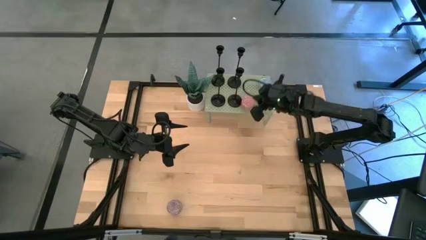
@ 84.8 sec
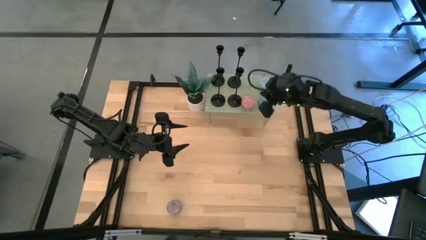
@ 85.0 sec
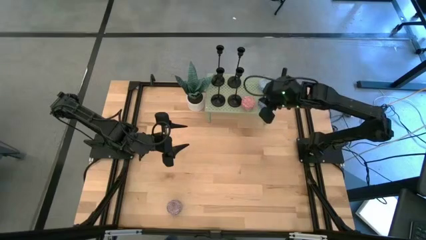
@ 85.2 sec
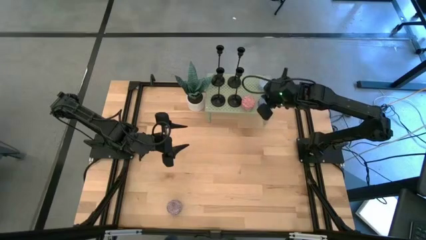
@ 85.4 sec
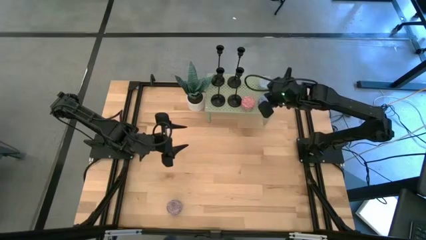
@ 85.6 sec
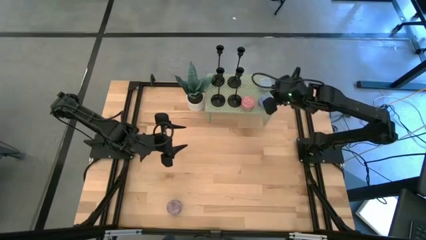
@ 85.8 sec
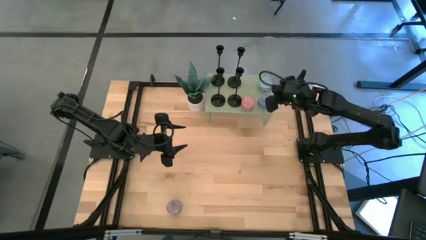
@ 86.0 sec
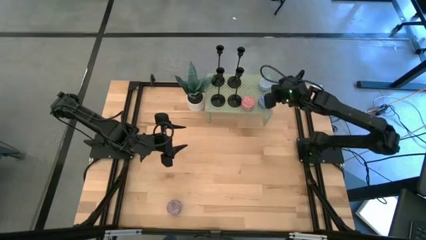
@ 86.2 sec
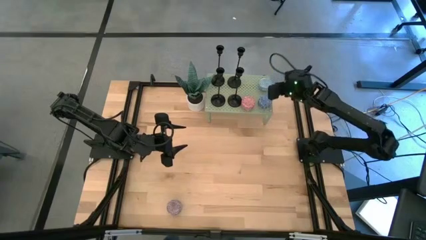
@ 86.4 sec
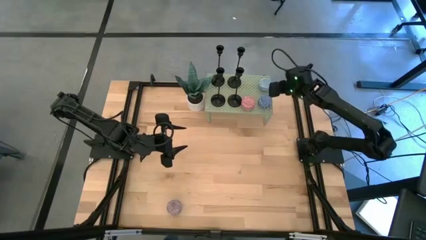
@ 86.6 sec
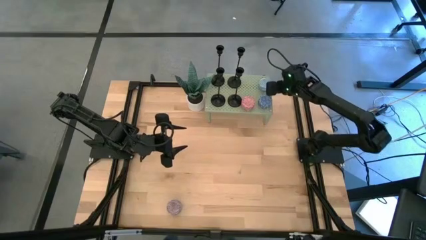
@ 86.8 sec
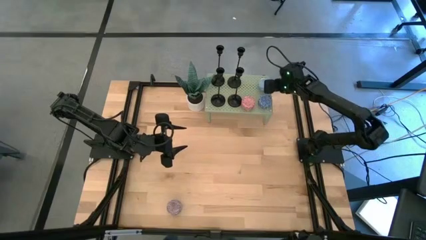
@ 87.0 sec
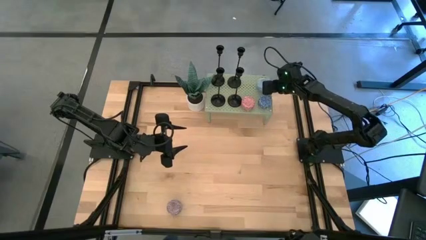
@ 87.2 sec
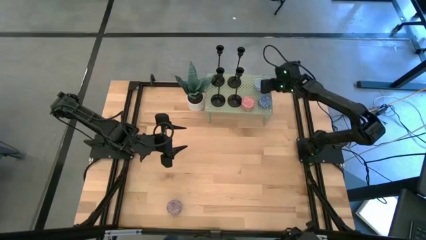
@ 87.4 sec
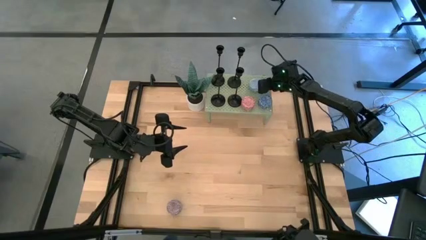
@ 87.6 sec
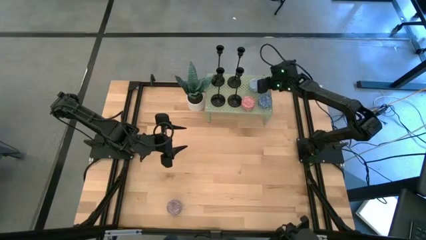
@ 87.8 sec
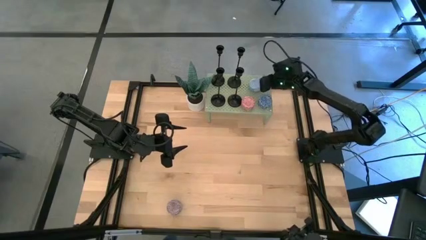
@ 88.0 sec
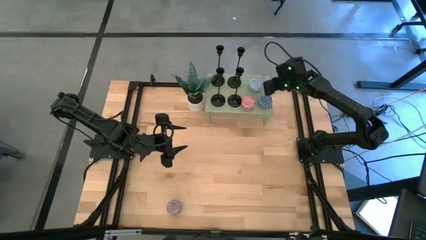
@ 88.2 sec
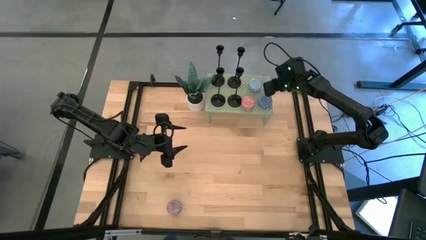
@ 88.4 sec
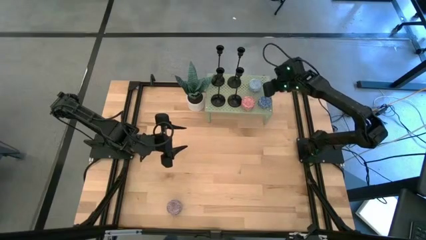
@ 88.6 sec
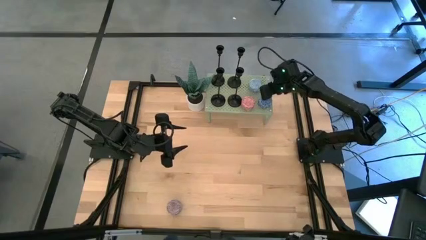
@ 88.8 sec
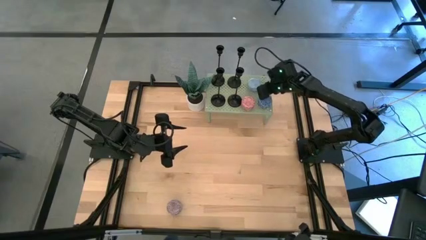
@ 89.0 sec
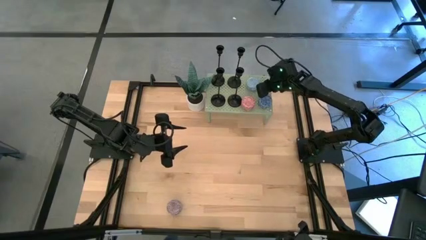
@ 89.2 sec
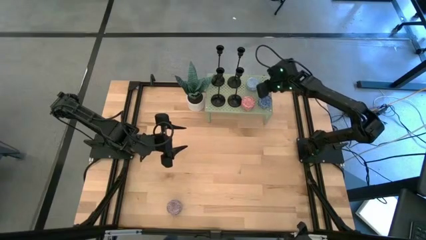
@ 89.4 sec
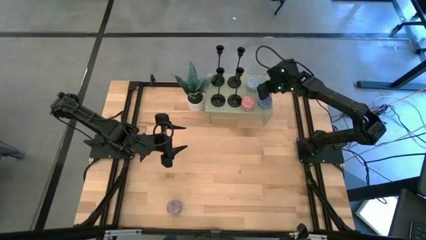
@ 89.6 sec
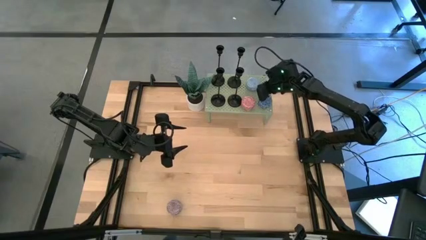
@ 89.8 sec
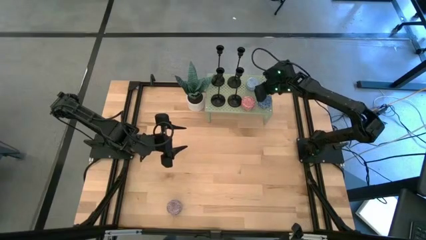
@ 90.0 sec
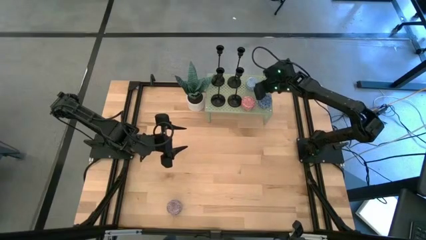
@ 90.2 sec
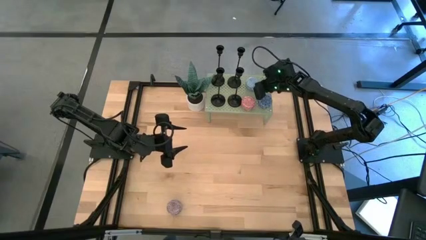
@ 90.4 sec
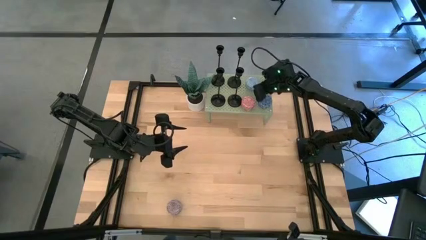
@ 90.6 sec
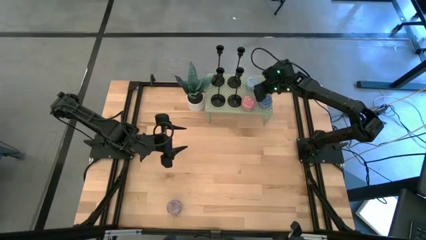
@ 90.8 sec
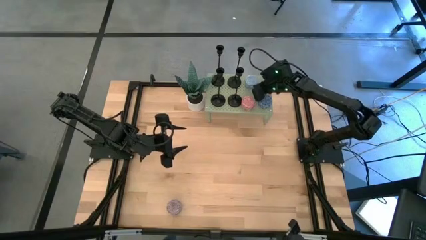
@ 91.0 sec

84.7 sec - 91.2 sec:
Task: Pick & Place candle stick holders
Adjust the light blue scented candle on the shelf
